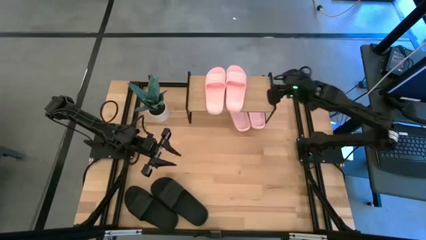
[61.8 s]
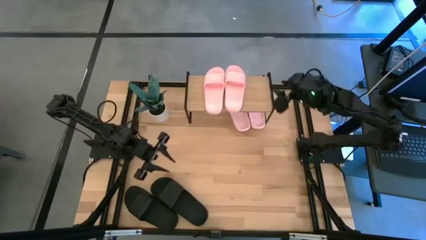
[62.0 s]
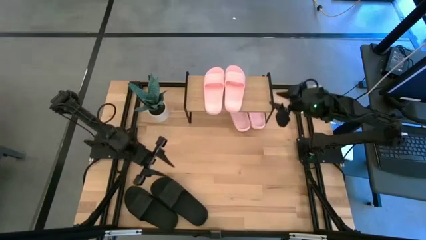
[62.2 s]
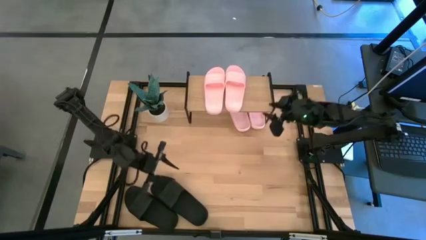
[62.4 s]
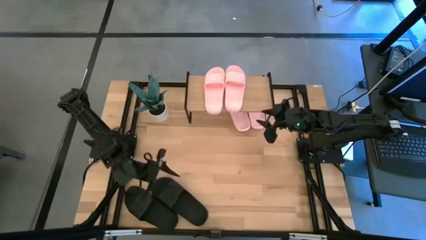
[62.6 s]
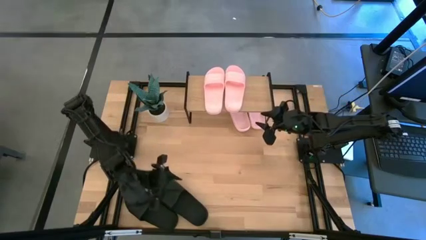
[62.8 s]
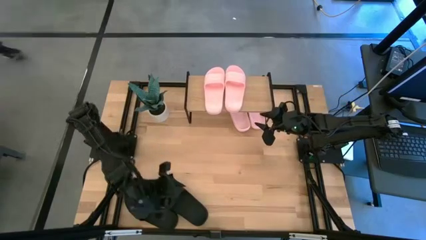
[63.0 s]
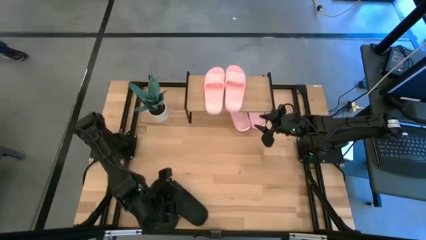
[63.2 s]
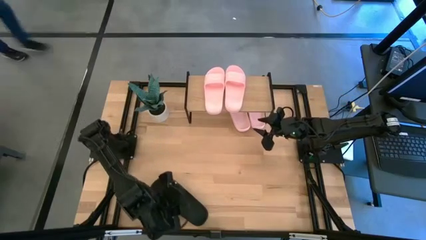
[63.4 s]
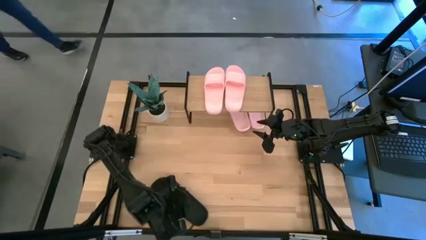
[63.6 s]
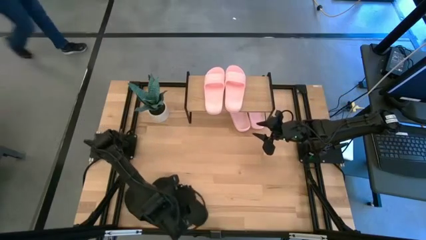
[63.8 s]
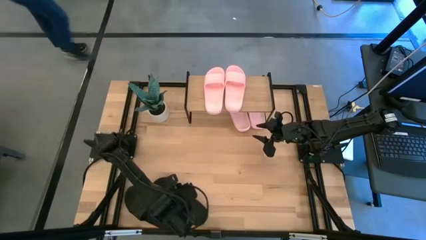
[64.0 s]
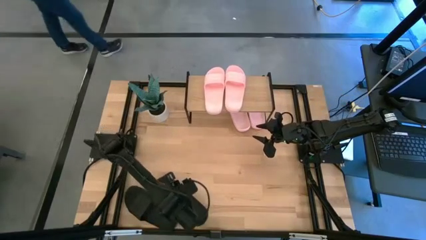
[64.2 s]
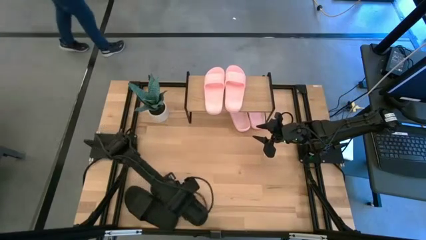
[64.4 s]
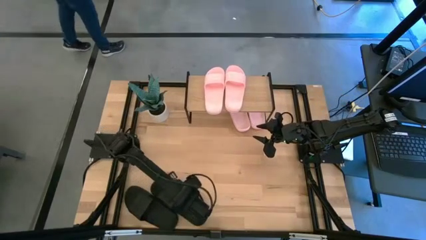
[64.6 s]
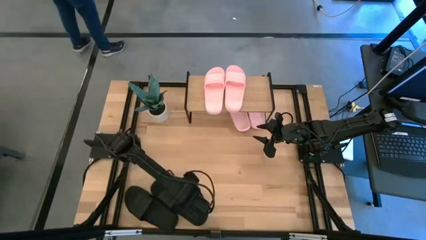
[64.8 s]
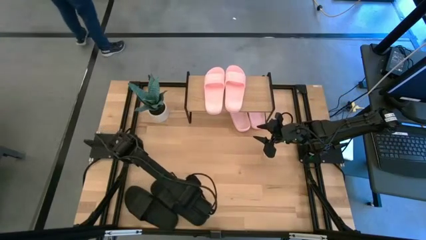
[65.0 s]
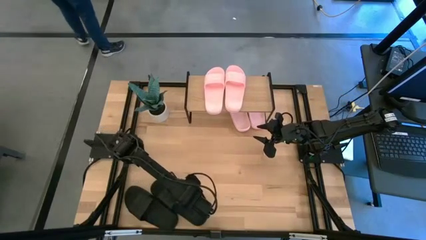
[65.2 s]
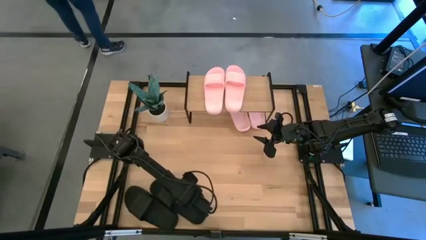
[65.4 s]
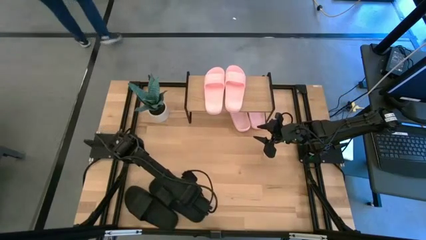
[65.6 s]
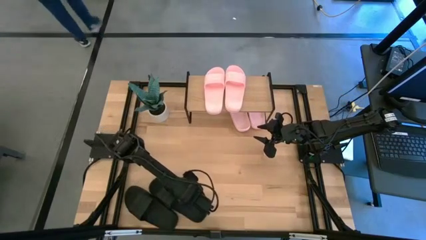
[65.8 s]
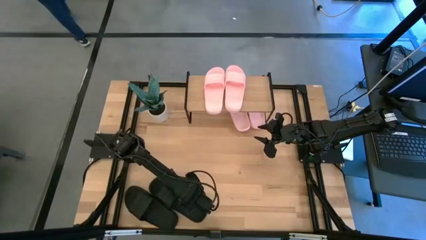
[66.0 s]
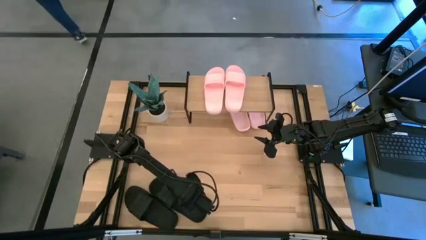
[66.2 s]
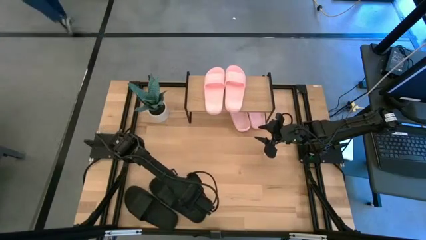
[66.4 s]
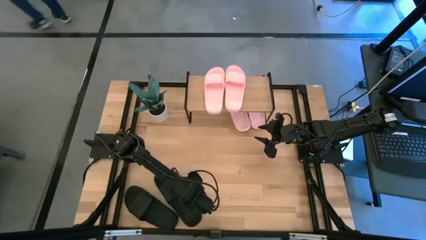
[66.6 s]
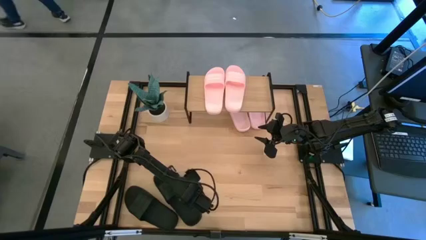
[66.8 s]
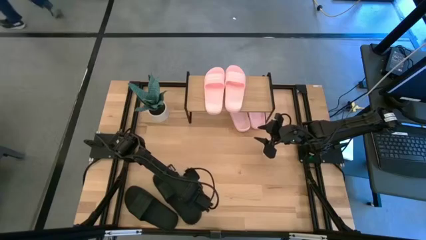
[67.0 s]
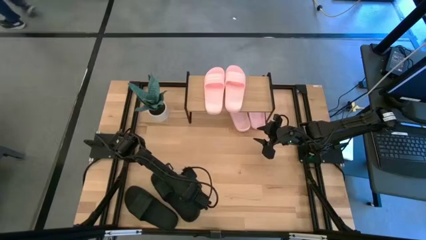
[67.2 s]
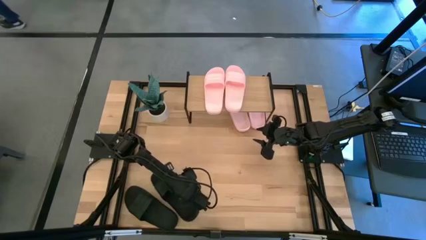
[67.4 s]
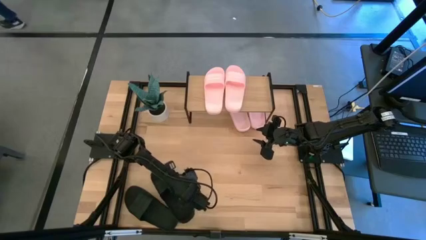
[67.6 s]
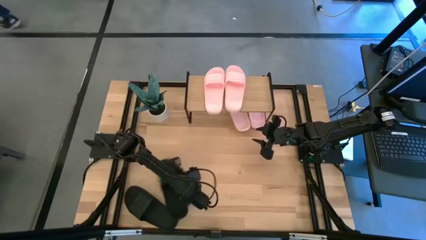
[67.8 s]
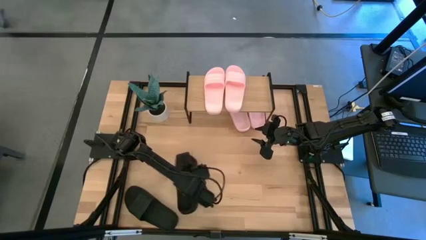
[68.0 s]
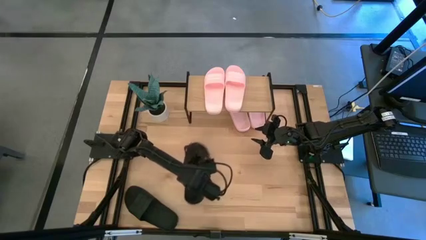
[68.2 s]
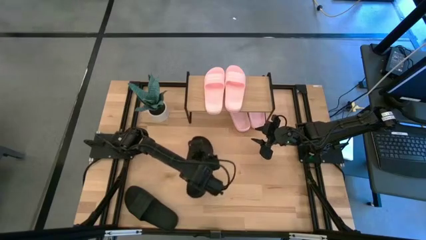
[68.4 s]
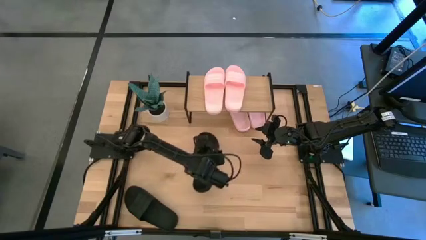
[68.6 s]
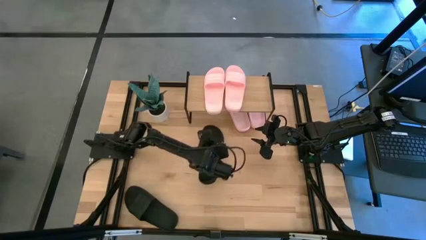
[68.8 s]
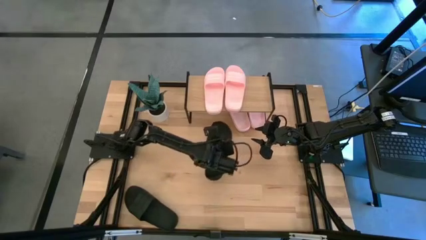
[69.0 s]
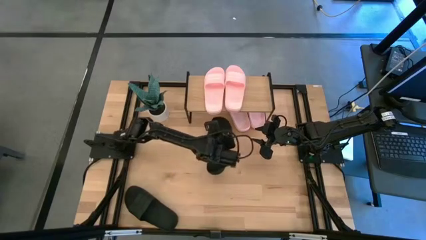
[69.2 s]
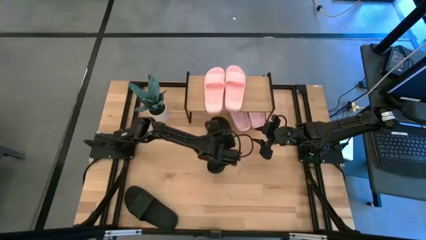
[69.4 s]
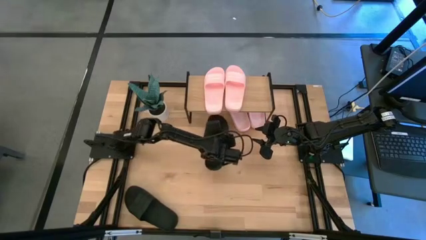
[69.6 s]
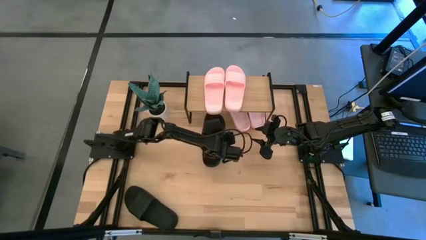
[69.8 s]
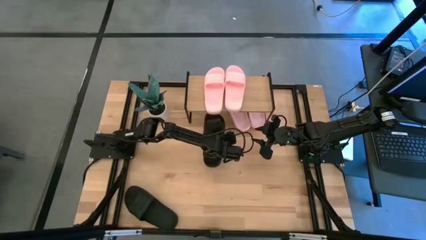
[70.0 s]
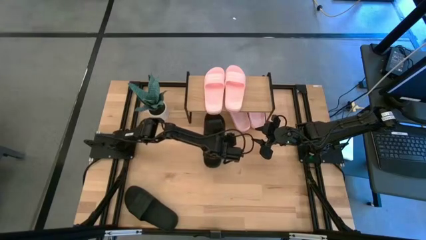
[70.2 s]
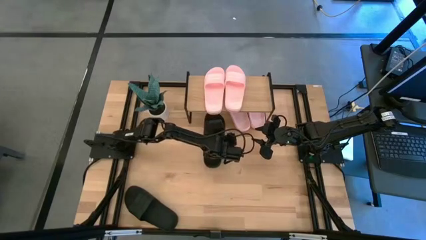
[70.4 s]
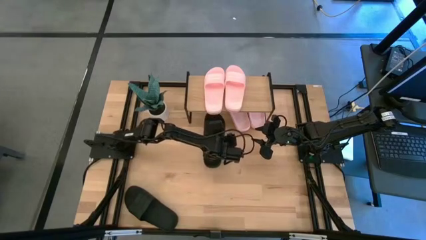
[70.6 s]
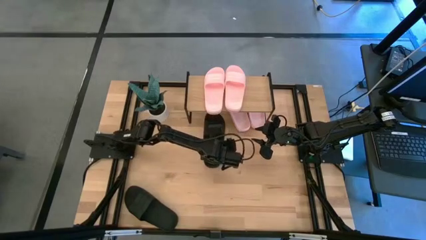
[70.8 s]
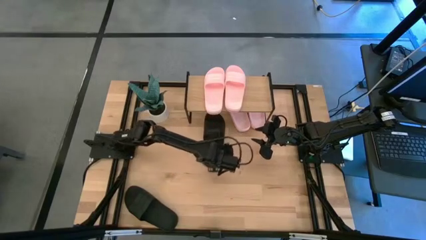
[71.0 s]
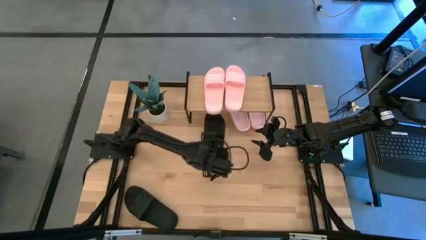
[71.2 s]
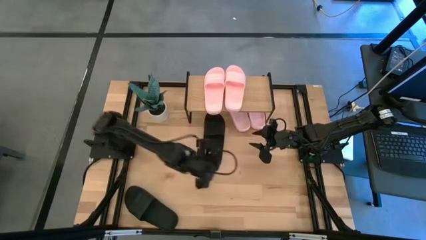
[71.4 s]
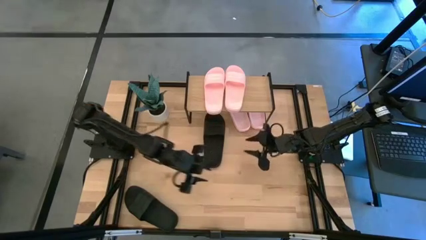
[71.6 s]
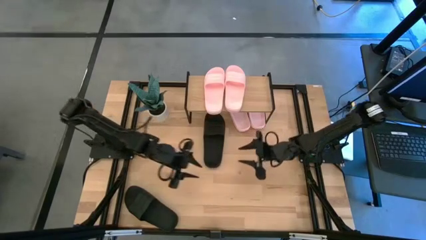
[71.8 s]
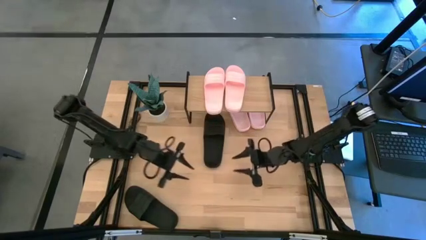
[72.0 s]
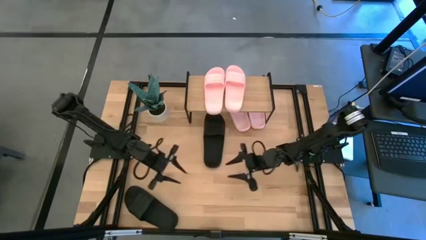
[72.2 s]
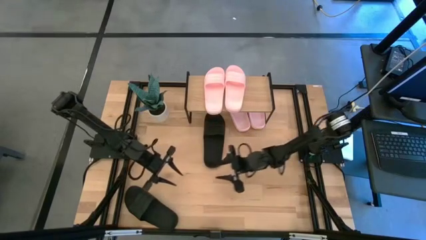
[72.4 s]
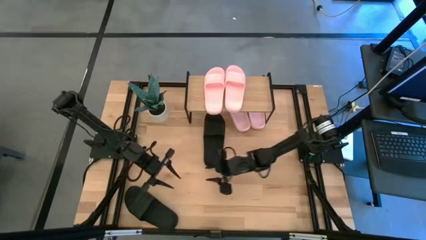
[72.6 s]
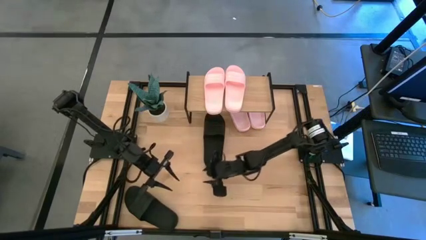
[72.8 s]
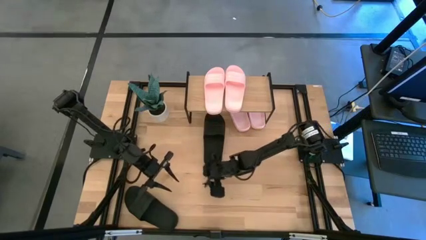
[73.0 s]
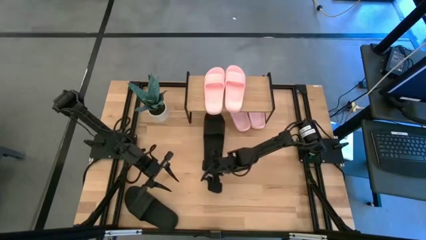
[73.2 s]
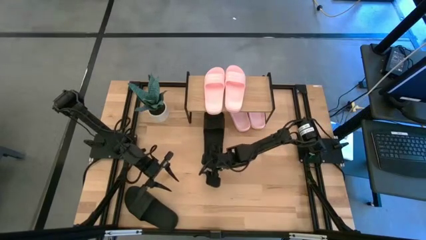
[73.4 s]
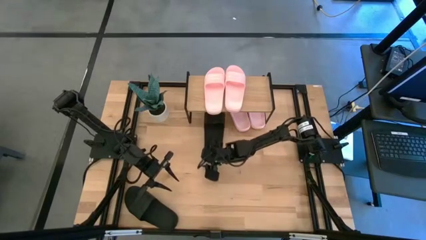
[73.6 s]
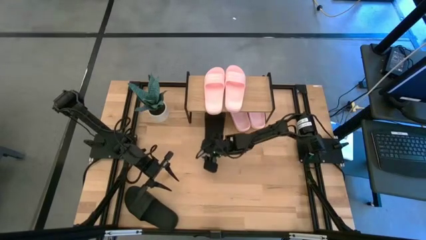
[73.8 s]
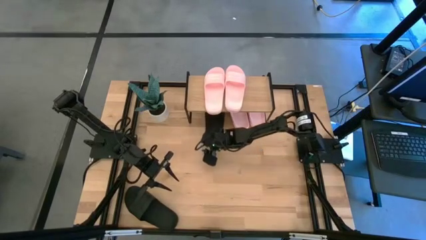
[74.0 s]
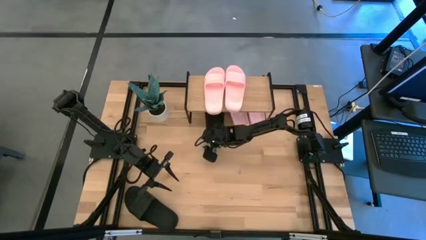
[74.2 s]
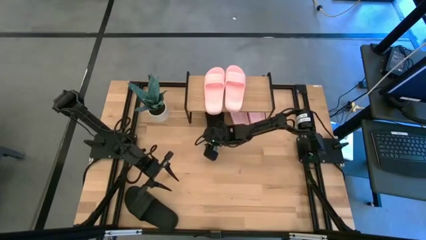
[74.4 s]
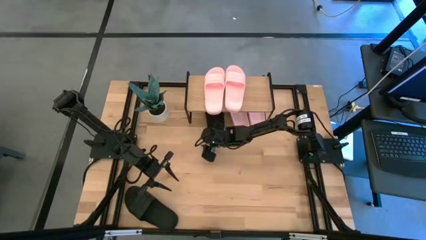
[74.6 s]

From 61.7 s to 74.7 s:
Task: Pick and place slides into the shelf
Put the black slipper under the shelf

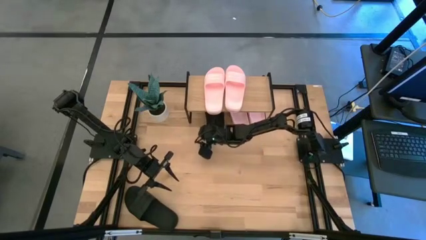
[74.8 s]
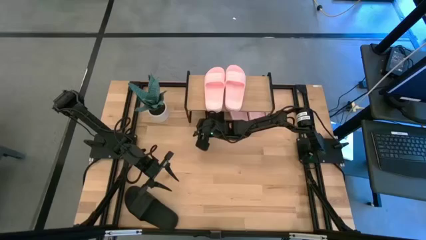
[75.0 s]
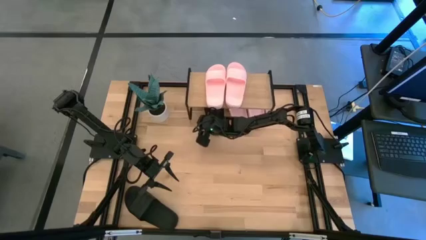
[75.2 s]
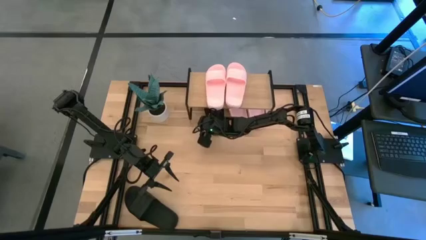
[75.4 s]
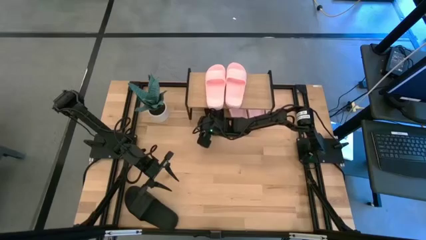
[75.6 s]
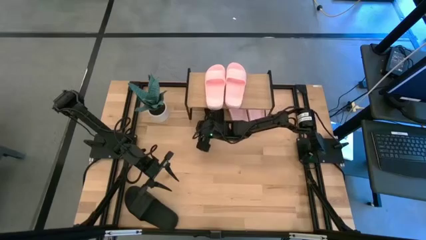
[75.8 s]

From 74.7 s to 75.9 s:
Adjust the shelf
